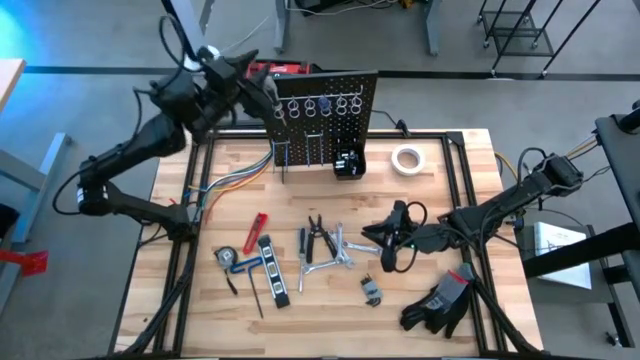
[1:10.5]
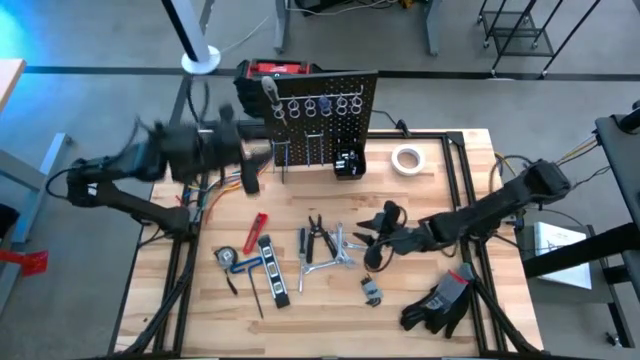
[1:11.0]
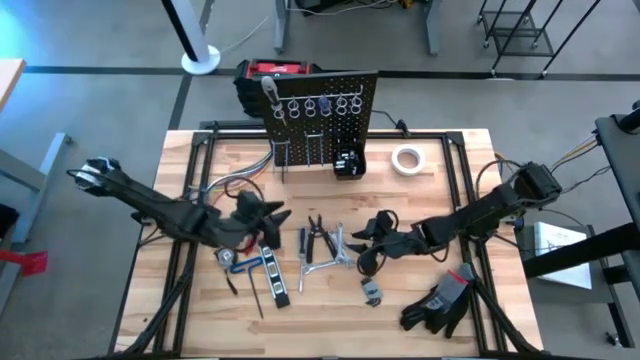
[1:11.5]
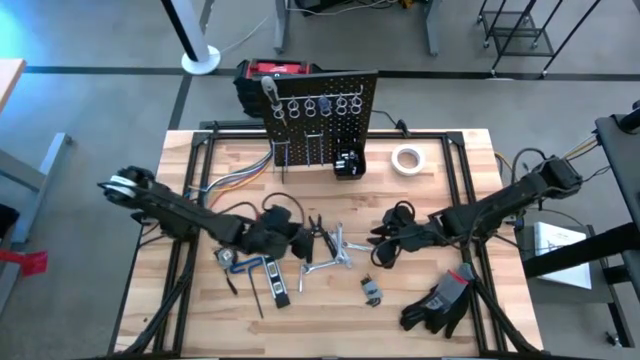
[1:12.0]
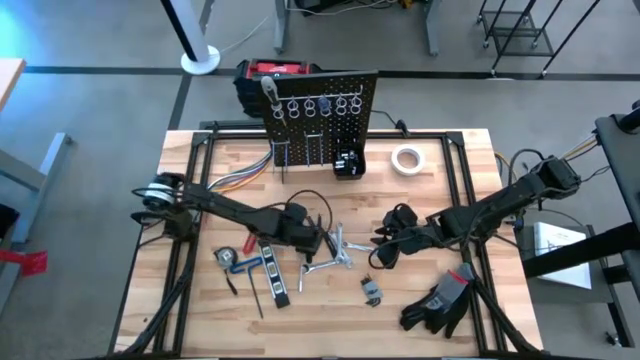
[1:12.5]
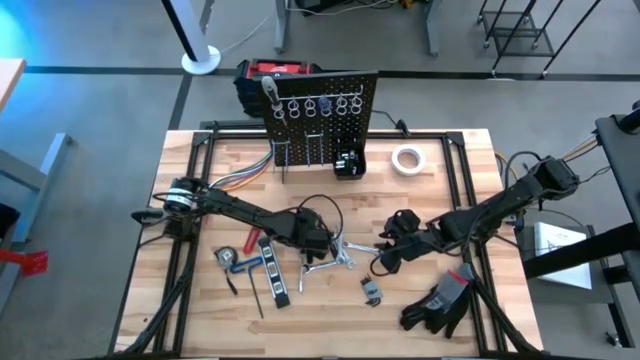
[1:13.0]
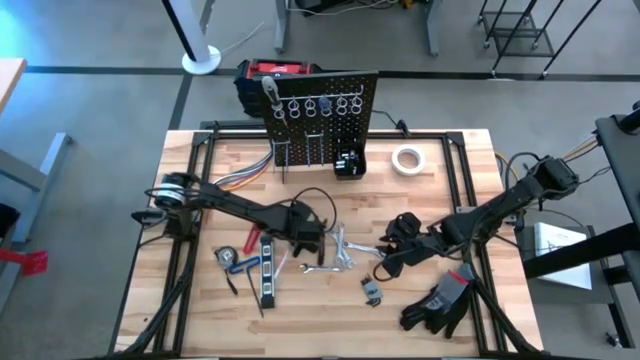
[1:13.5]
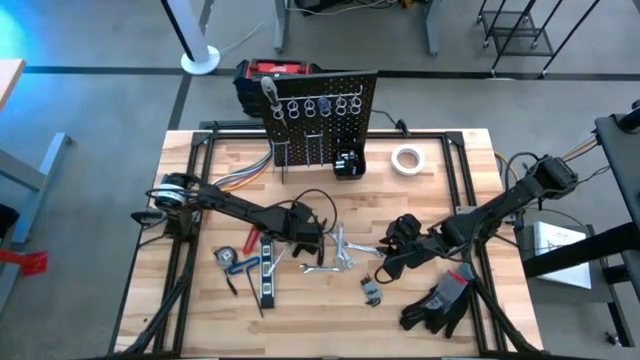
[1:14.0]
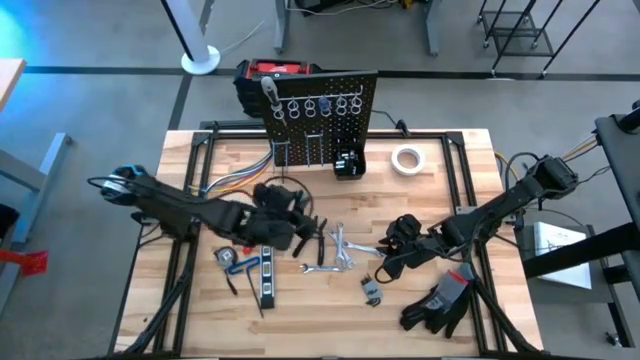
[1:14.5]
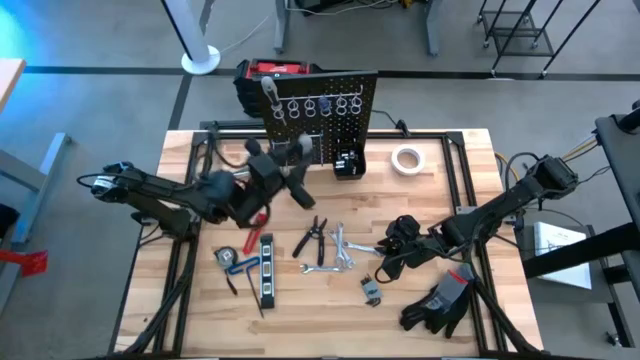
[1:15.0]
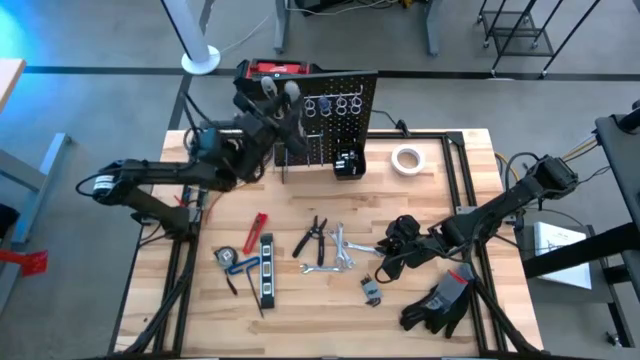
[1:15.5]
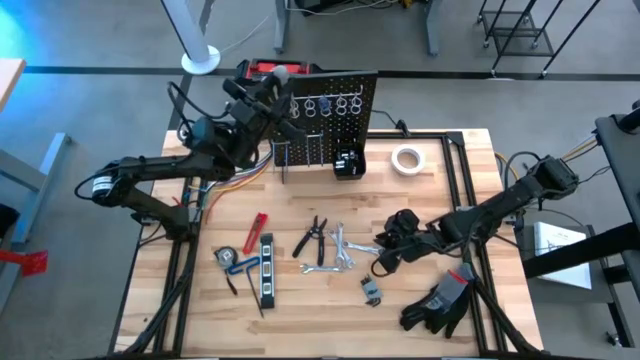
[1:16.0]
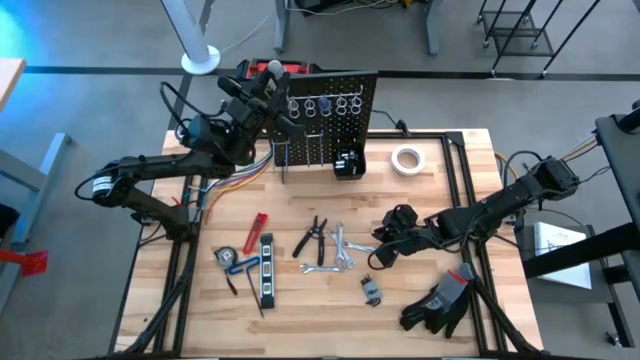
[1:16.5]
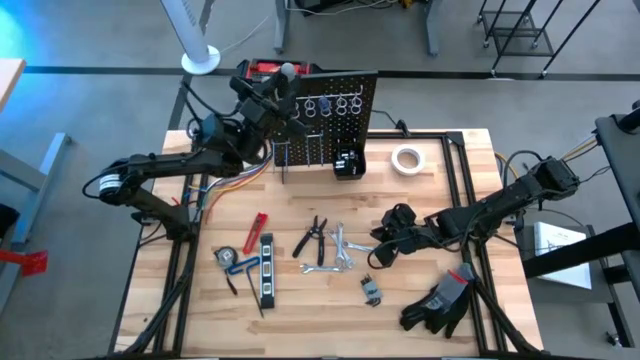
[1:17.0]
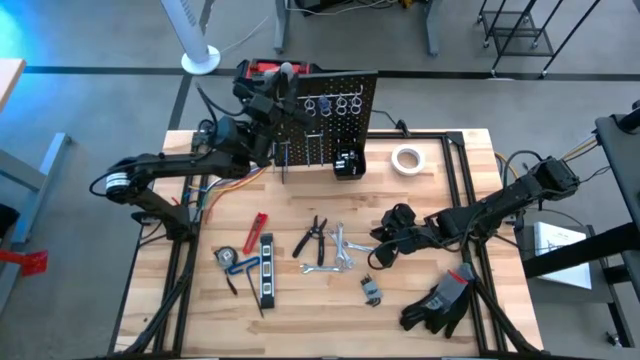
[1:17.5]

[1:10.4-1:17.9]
Task: Hang tools onto peg board
Hang the gray screwdriver on the peg board

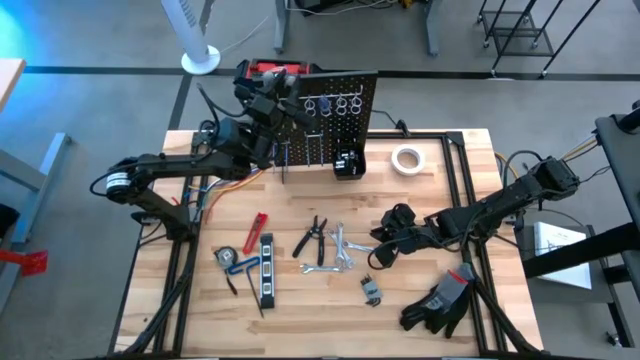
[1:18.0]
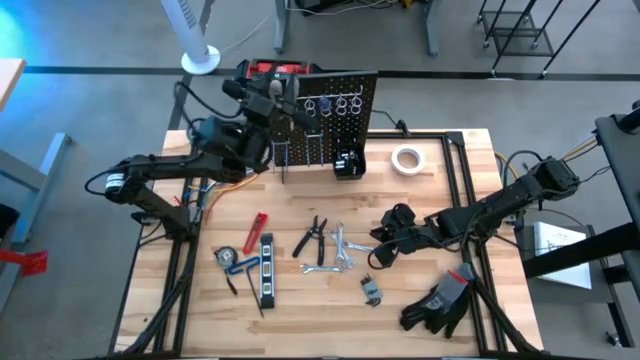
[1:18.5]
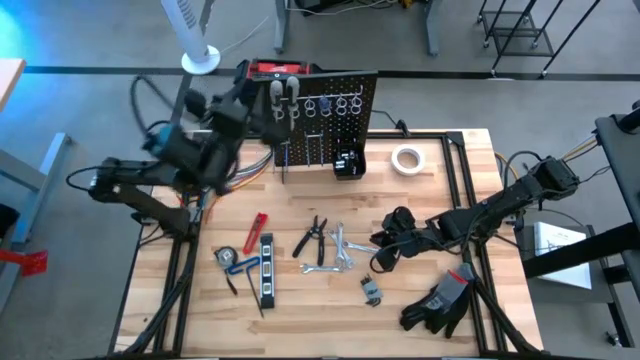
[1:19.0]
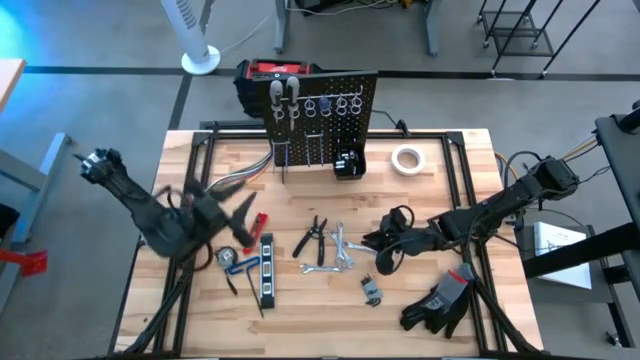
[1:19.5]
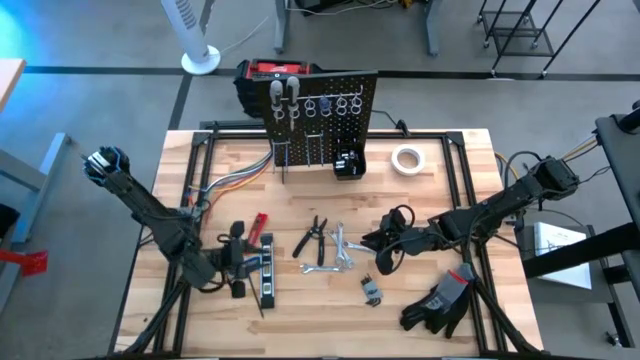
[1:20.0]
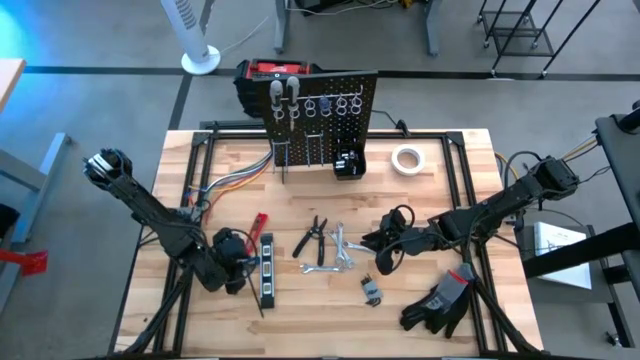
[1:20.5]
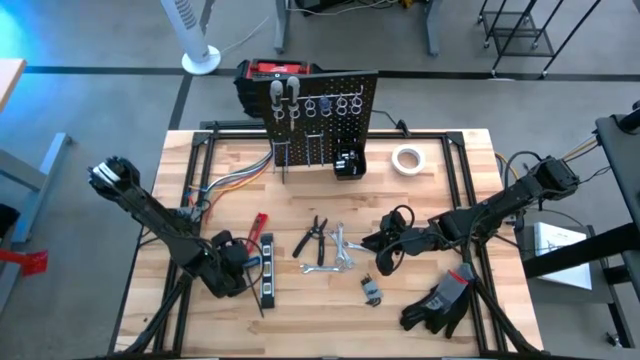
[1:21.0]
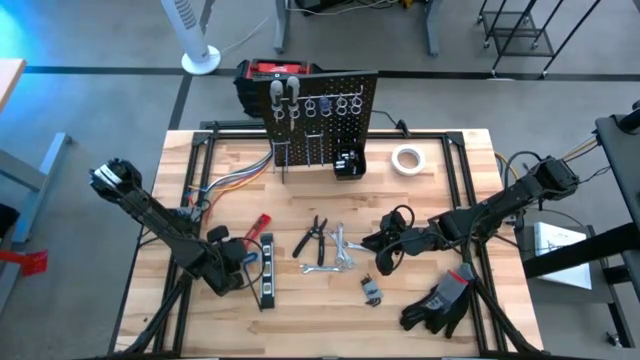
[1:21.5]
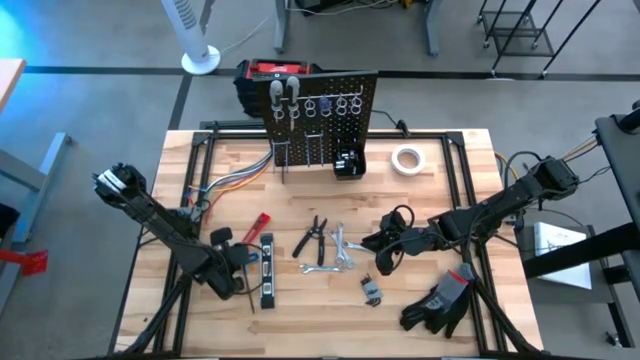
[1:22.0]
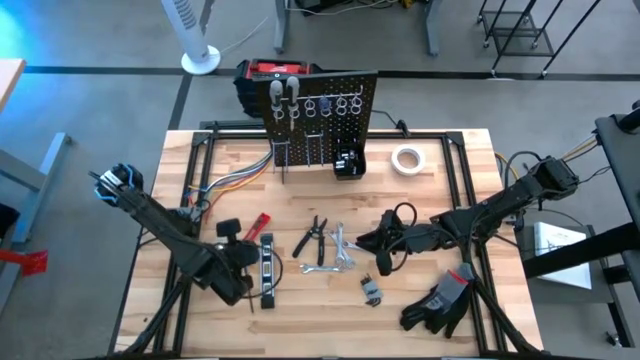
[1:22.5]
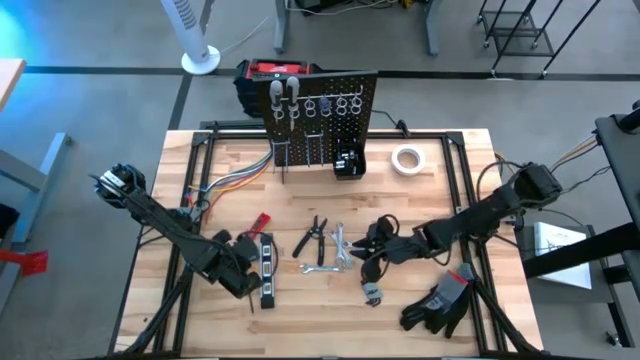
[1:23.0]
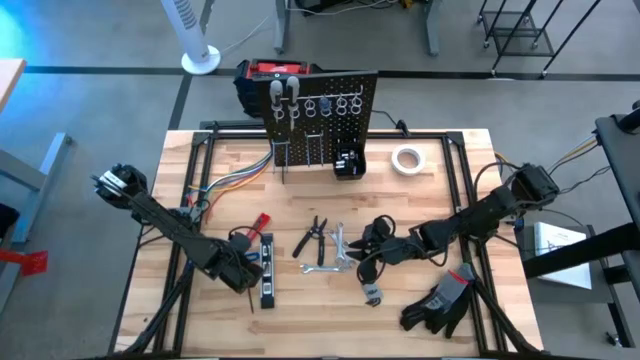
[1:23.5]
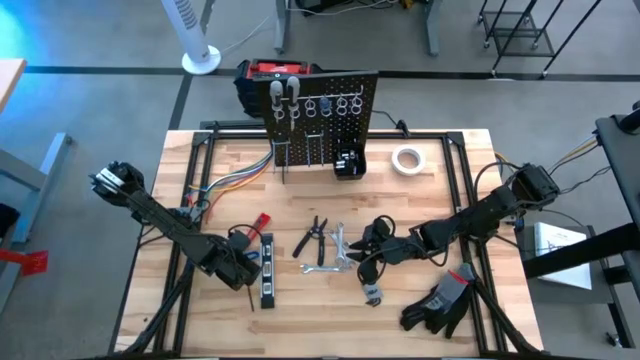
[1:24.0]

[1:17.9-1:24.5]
Hang the pick tool on the peg board

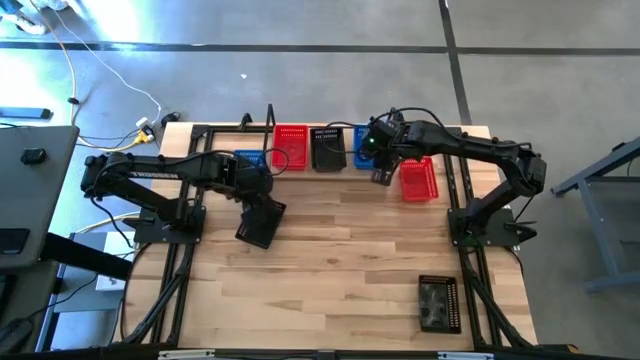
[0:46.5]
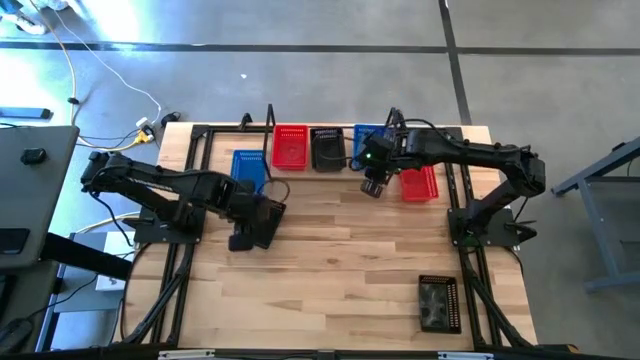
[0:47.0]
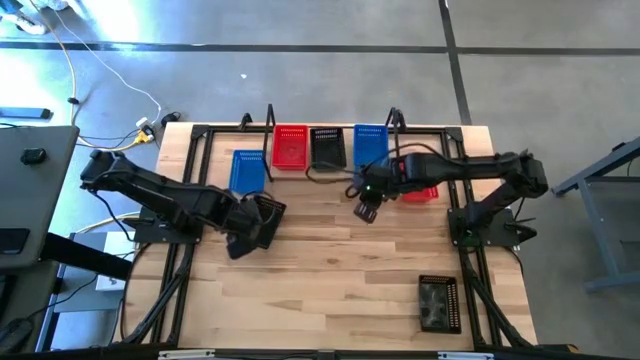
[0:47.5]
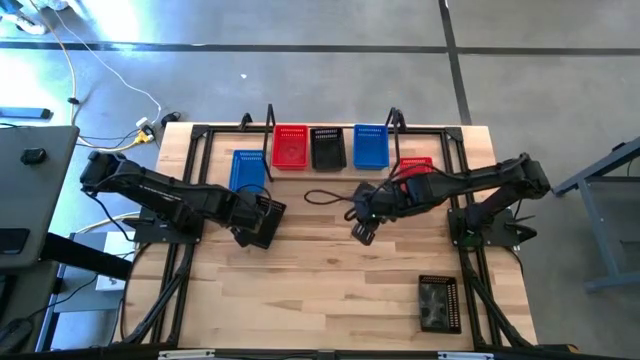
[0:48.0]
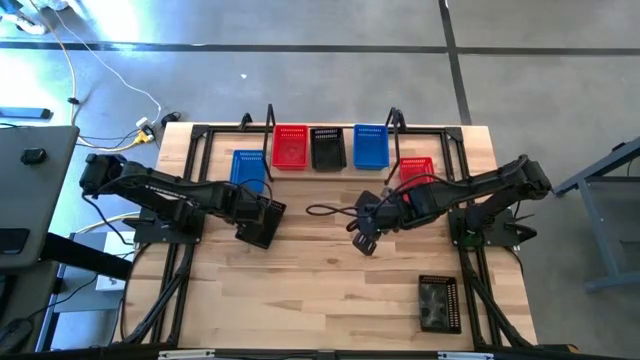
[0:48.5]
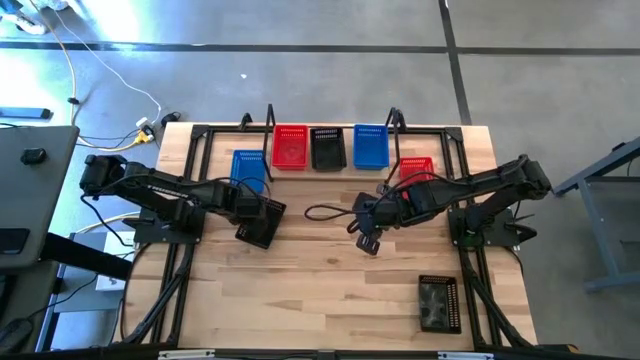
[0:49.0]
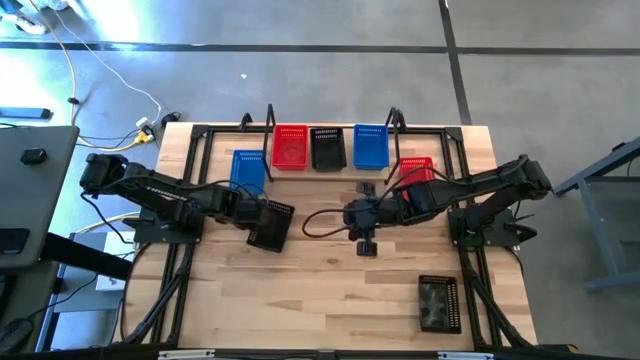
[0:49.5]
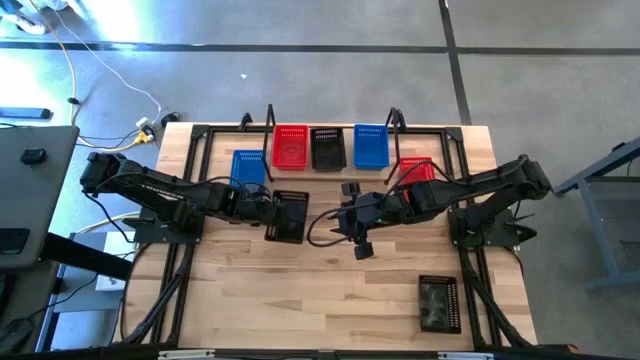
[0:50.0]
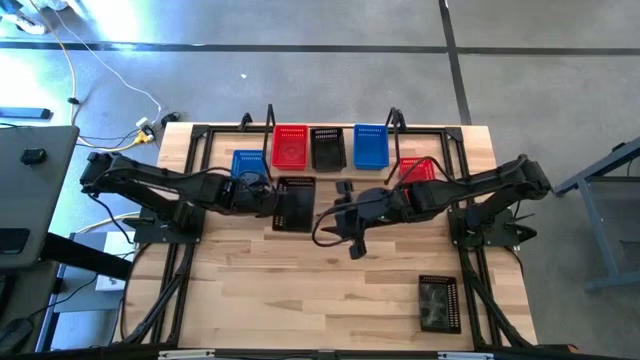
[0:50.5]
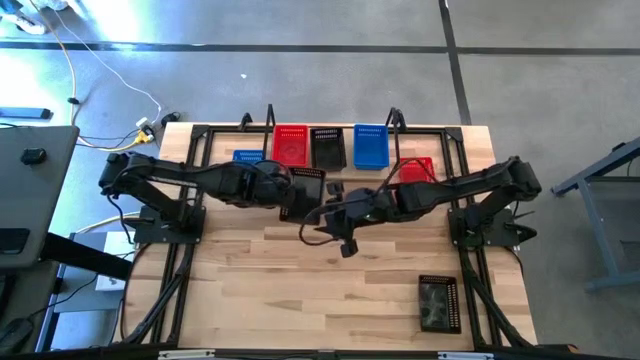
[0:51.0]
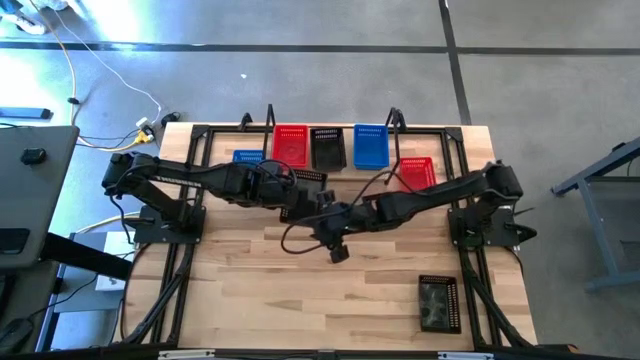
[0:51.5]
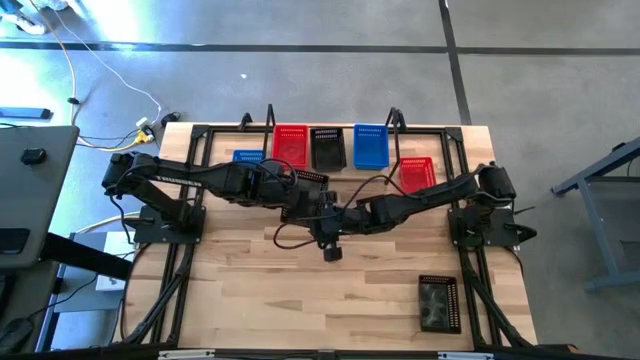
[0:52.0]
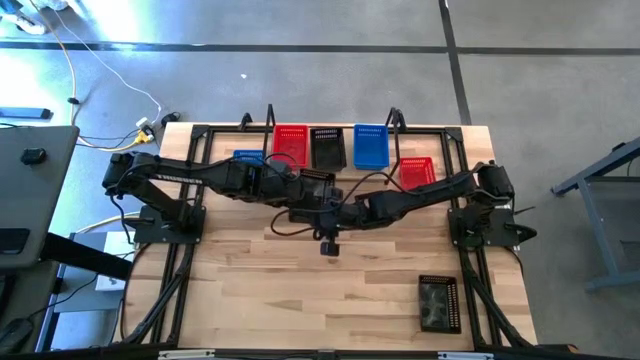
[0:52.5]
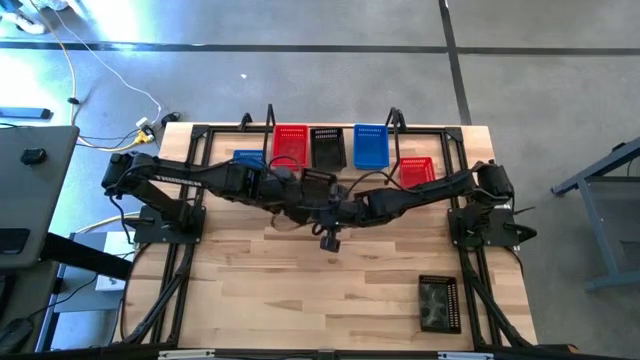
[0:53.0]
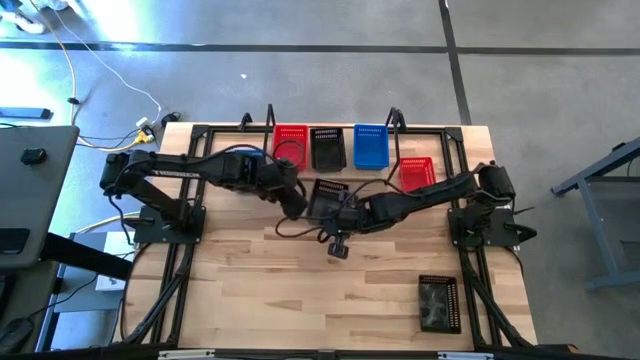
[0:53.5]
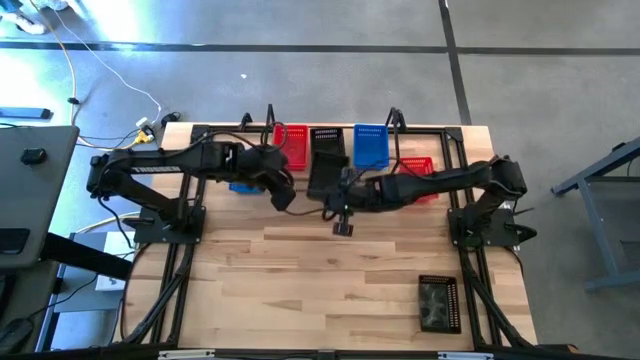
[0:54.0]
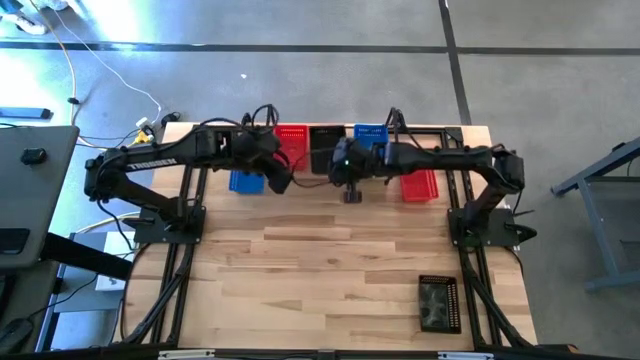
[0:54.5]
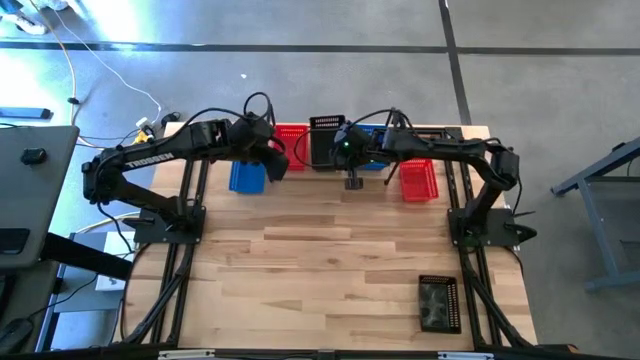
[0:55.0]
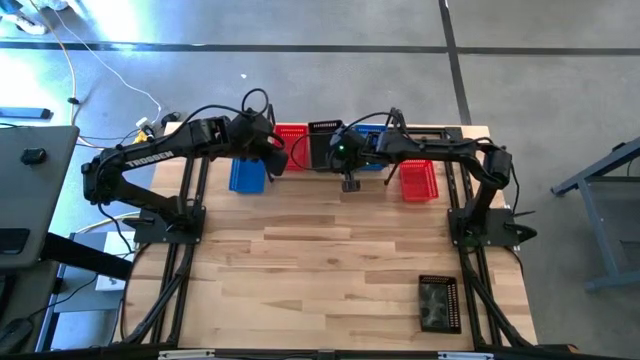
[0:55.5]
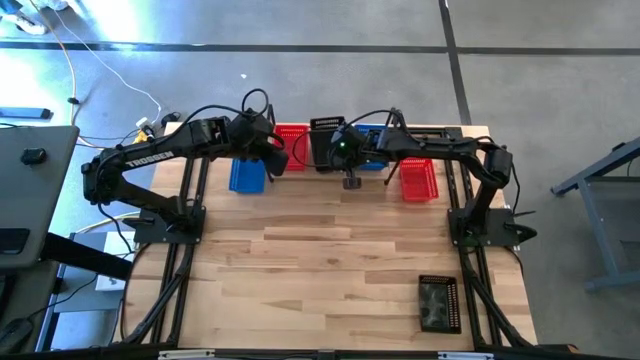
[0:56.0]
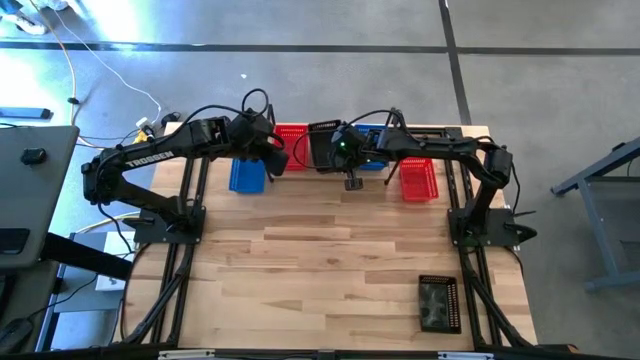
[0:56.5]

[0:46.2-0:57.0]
Task: Stack baskets on shelf by color
Stack the top black basket on top of the black basket on the shelf
